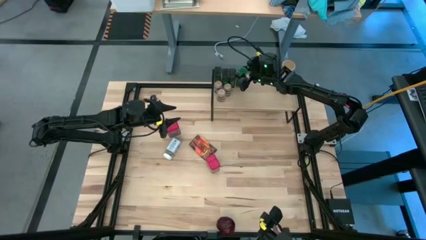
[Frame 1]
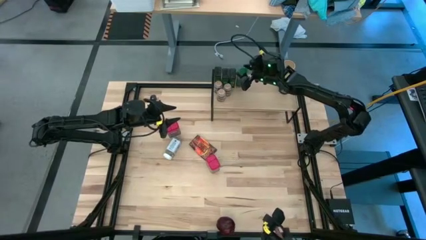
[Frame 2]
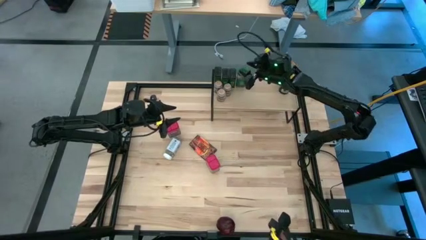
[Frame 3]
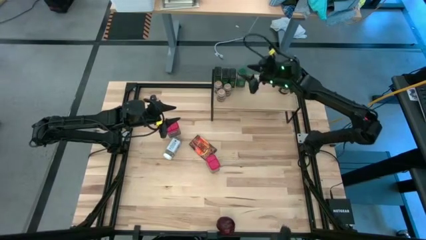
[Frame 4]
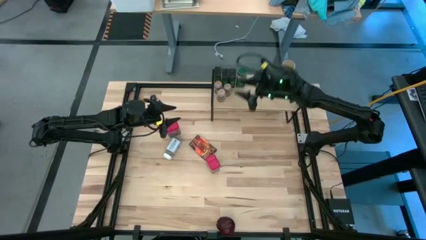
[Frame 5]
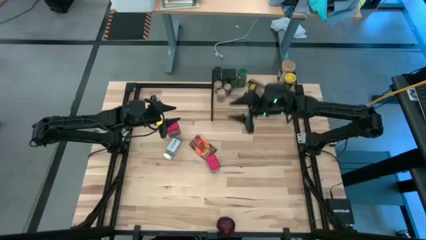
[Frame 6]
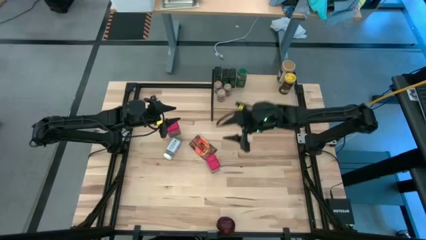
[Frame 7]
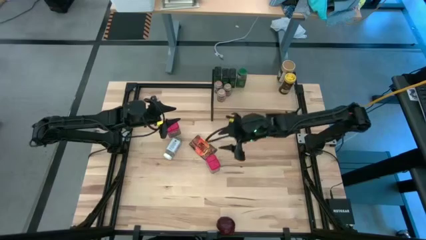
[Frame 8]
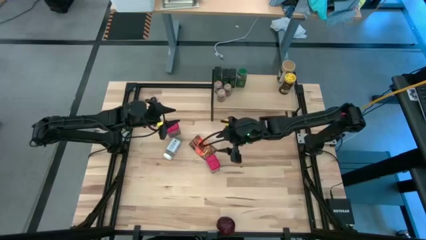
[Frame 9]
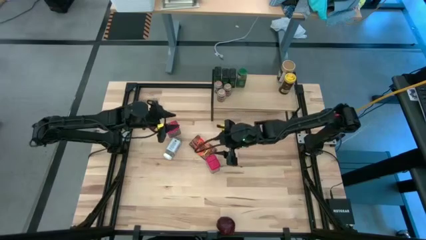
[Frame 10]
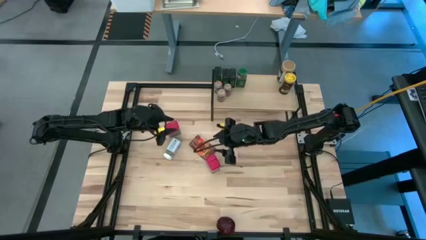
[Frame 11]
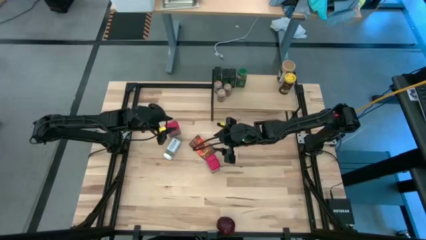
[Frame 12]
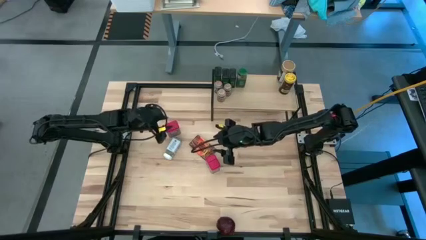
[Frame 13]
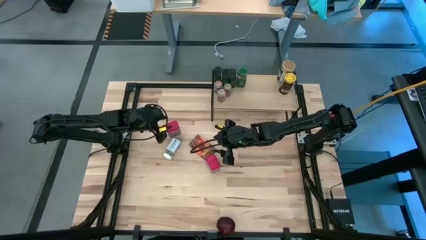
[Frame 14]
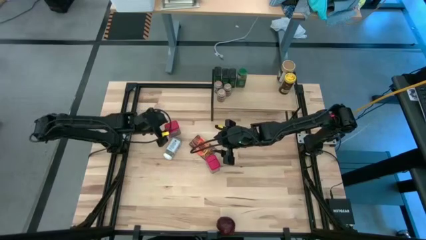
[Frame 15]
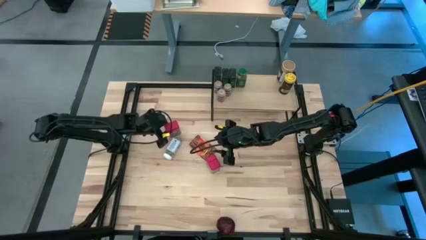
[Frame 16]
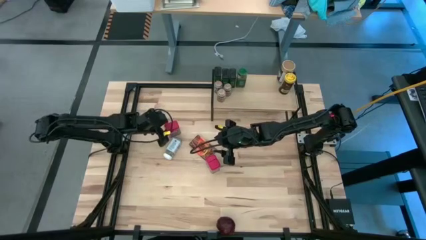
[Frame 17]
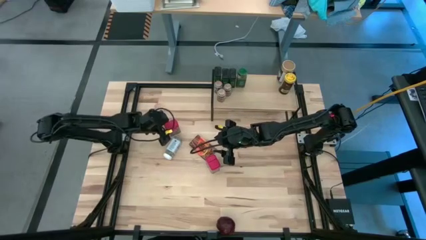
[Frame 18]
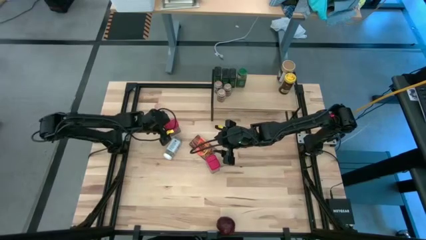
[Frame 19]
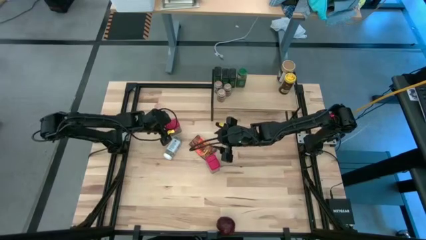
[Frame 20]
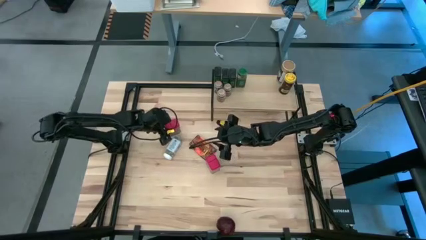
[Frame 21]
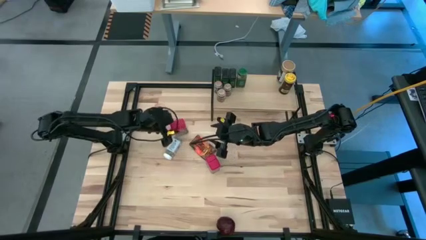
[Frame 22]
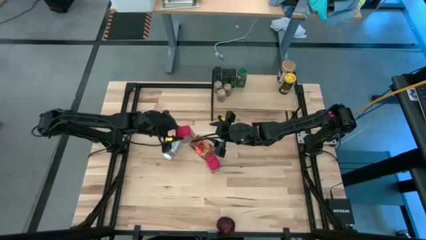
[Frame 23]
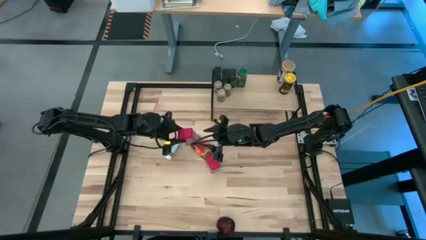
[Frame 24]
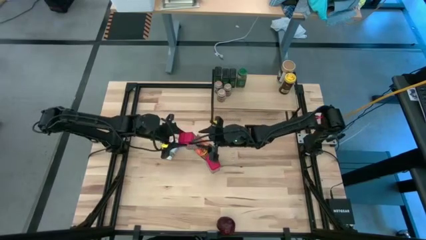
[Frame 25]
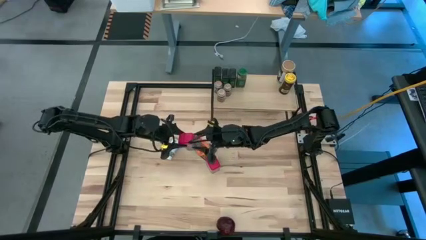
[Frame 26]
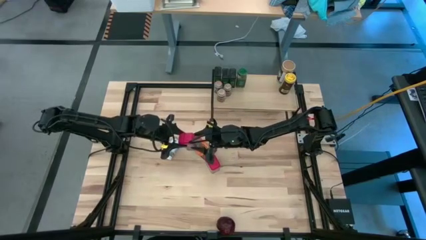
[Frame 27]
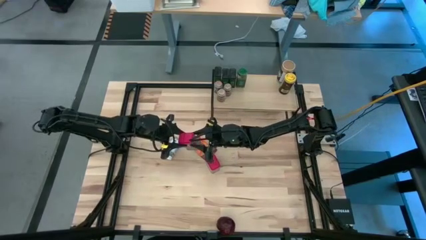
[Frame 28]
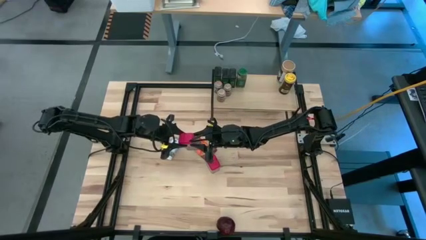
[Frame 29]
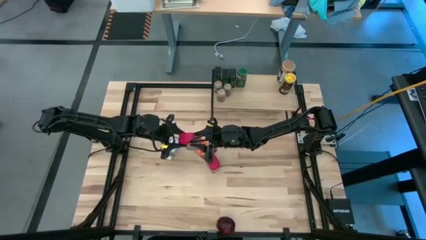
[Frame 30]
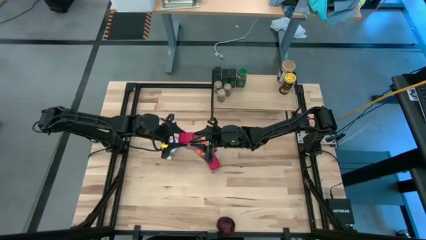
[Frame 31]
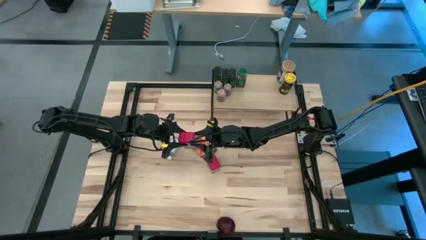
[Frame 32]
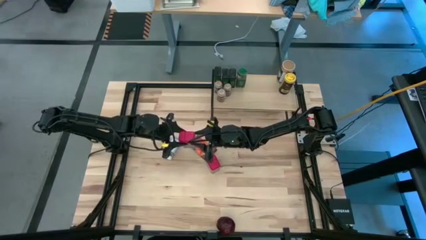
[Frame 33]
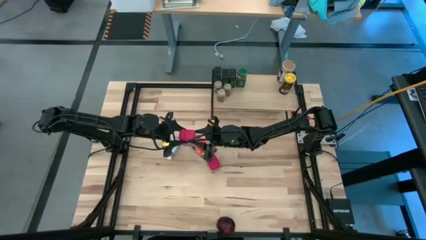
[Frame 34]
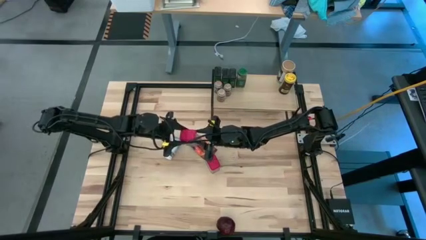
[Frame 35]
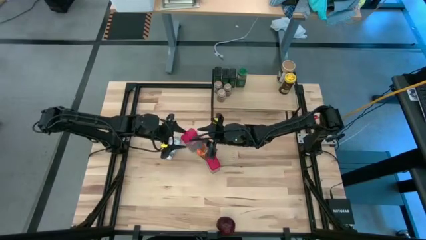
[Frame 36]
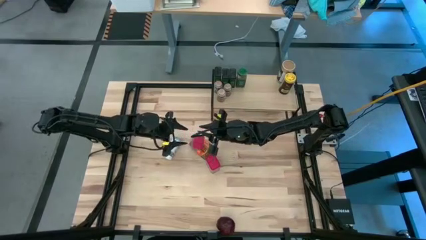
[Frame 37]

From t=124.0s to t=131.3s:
Task: Shelf spices
Put the top red seasoning can on the shelf

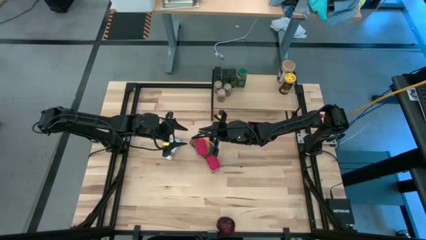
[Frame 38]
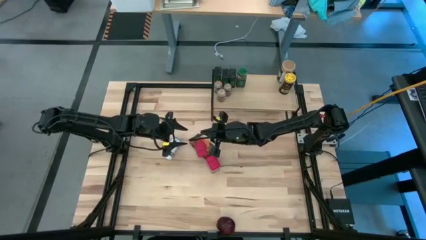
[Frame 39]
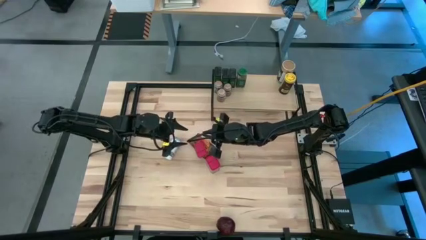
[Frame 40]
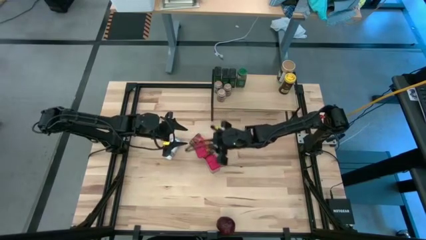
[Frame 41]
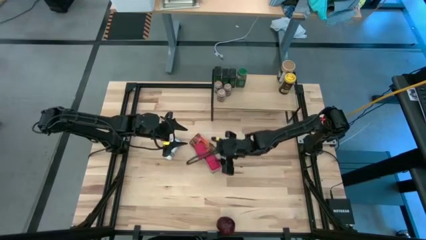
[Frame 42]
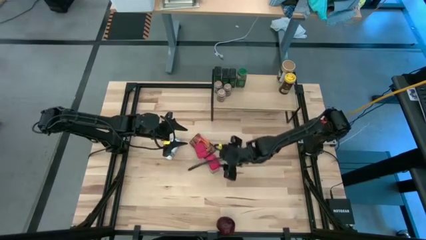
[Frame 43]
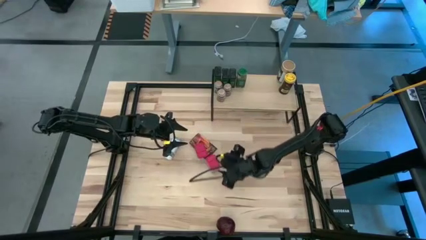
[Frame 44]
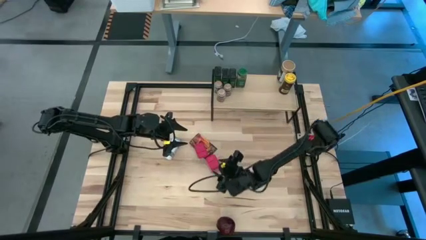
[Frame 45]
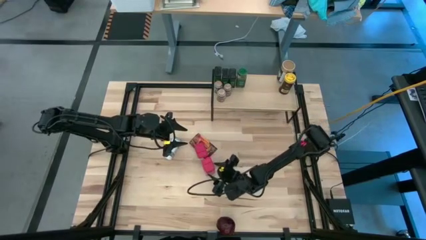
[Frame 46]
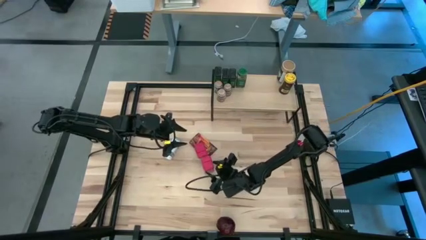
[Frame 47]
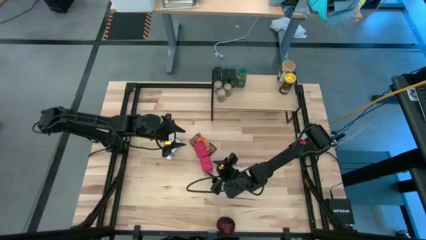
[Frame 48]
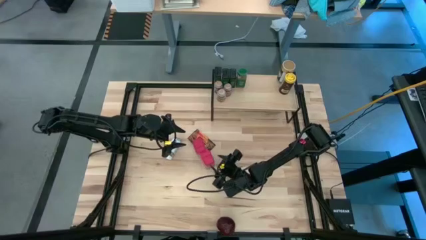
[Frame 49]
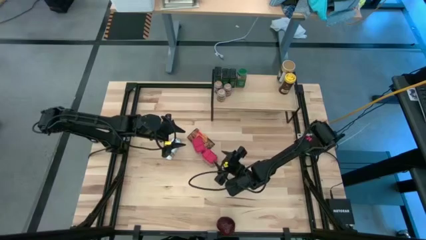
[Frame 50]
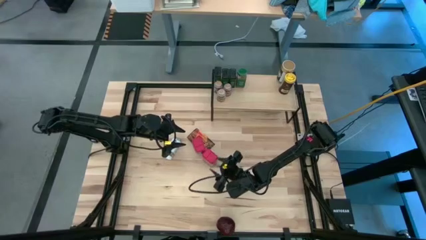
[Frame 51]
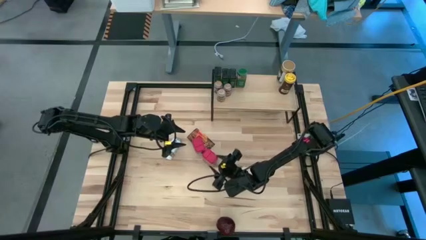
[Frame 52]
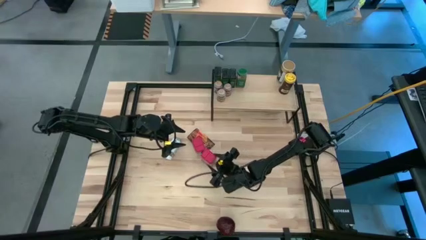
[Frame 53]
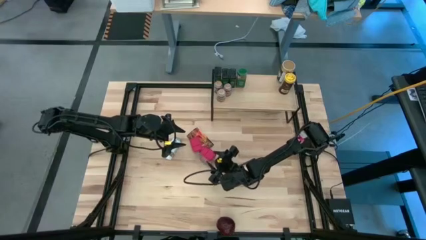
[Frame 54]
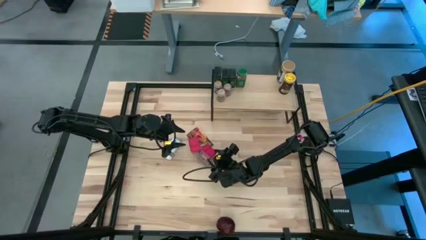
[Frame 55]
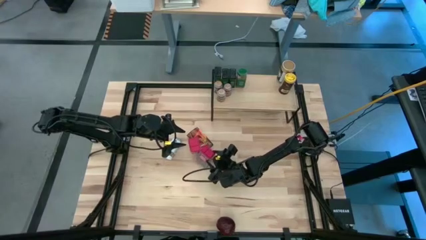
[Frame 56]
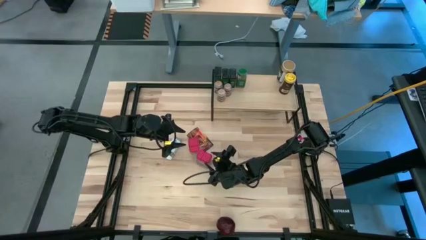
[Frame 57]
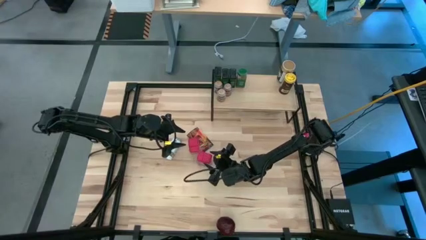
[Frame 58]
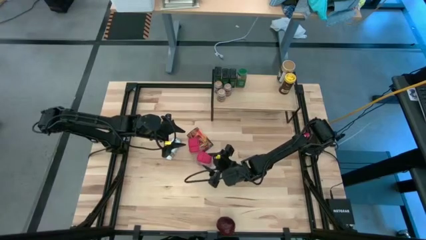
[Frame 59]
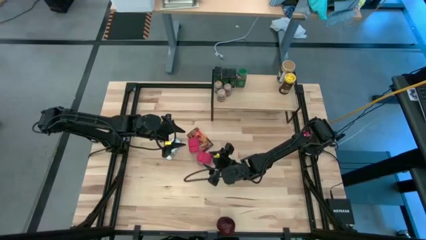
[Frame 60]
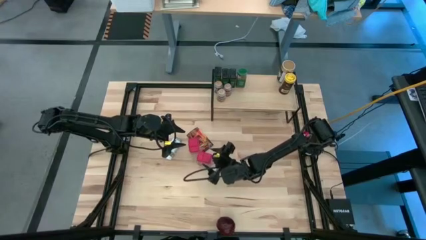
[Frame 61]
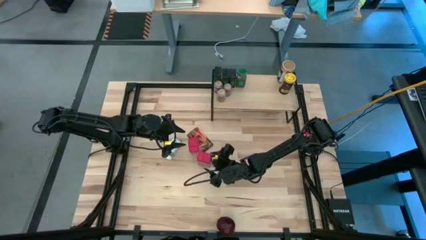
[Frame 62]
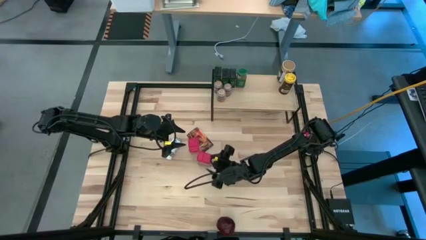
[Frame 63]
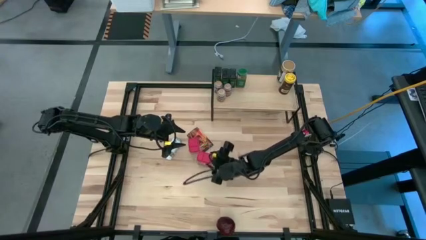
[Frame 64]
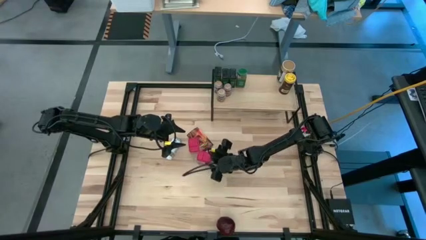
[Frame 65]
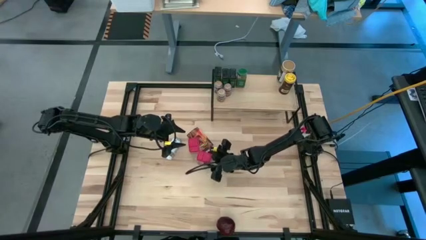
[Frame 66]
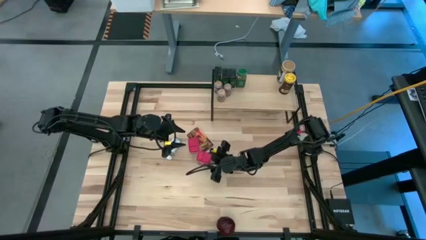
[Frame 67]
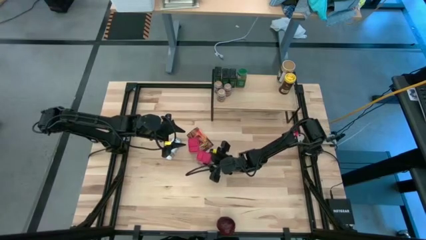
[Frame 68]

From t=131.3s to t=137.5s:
Put the bottom red seasoning can on the shelf

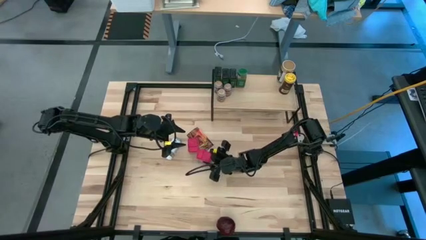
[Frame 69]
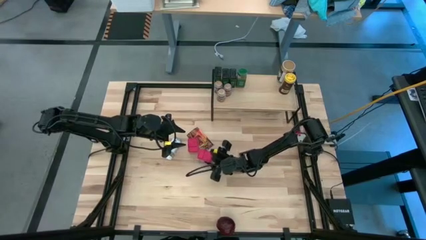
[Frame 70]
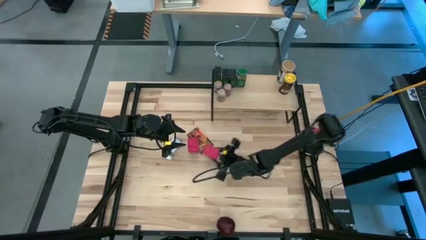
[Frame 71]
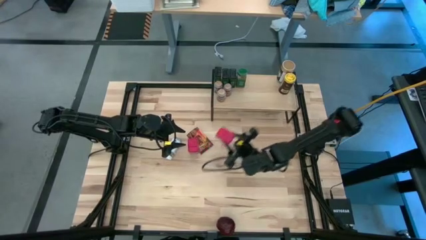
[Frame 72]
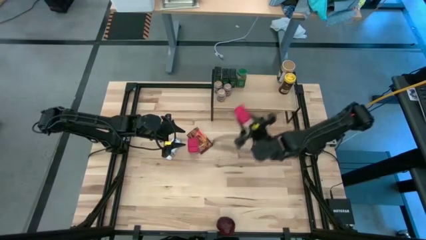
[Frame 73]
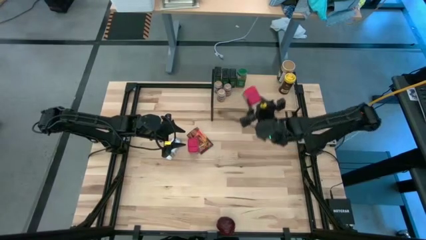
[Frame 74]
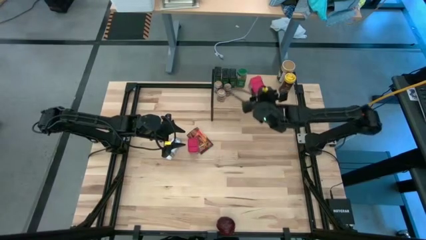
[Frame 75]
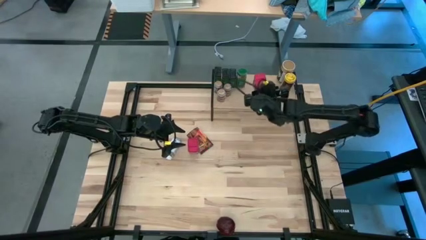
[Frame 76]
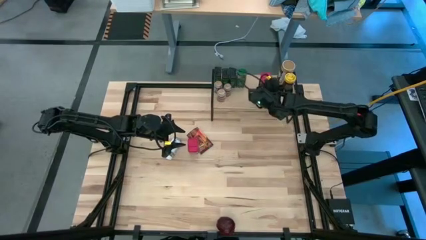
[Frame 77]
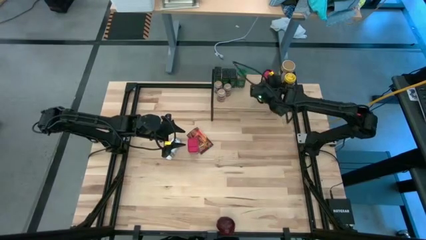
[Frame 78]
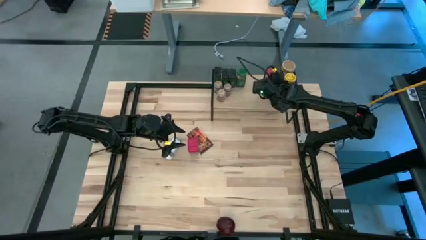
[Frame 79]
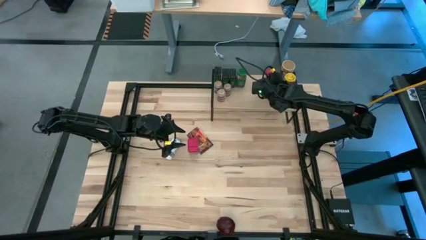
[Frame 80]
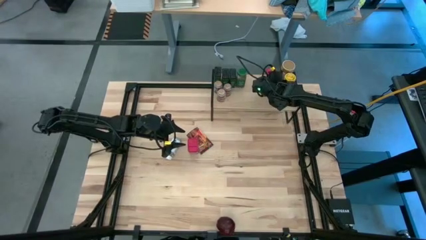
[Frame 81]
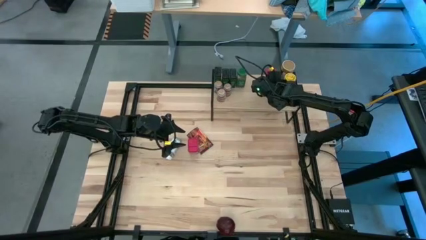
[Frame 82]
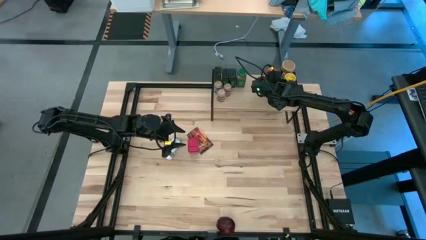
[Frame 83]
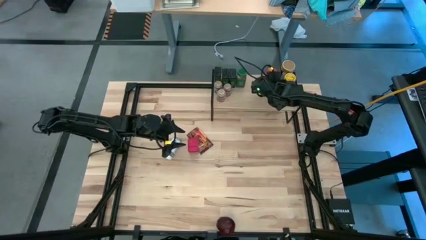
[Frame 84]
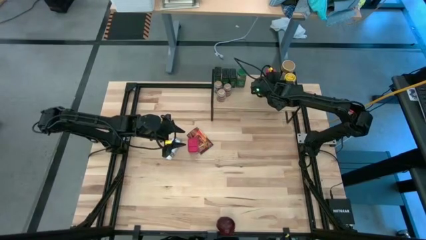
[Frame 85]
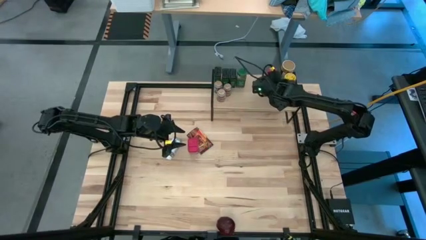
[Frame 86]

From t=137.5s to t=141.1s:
Put the left red seasoning can on the shelf aligned with other spices
